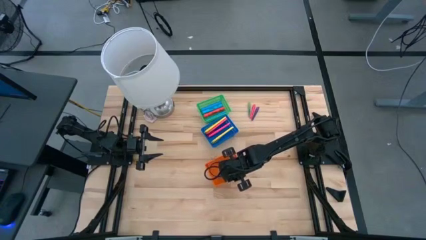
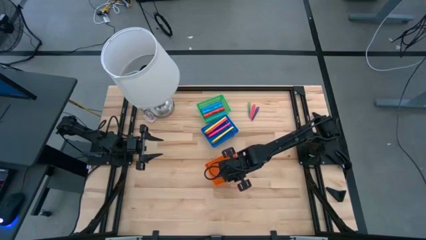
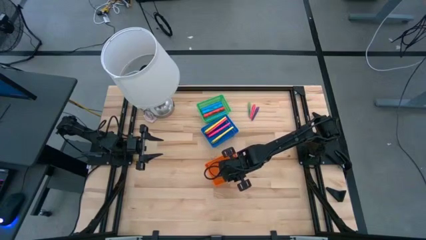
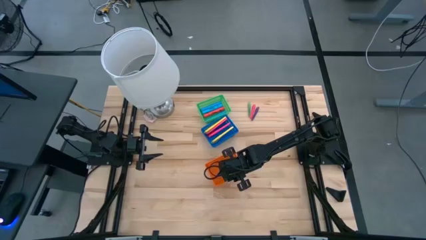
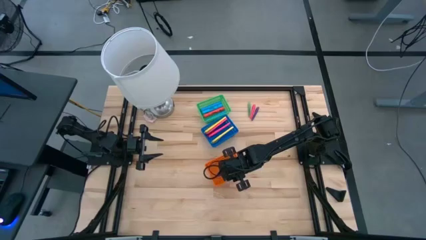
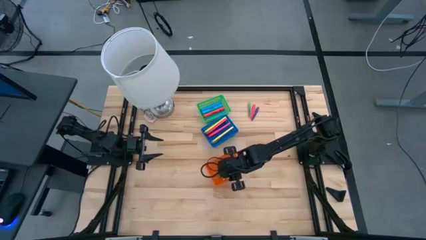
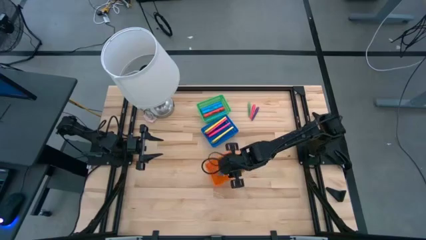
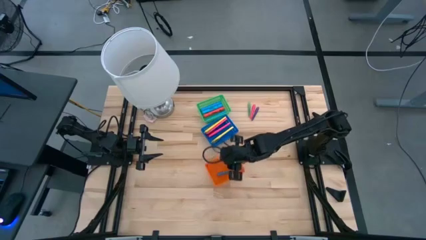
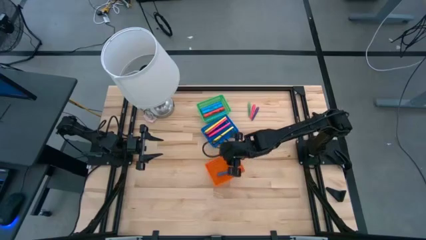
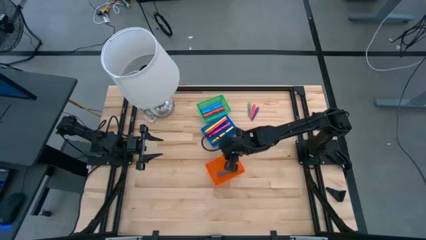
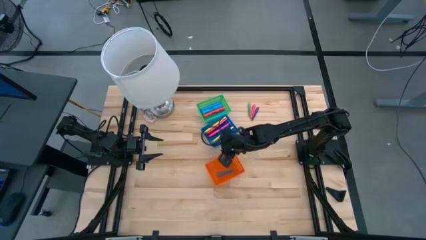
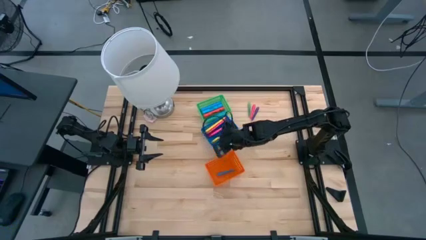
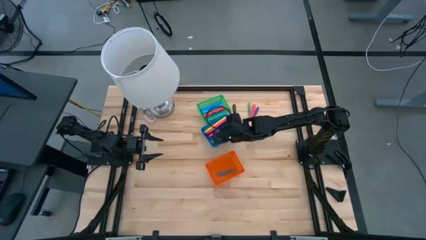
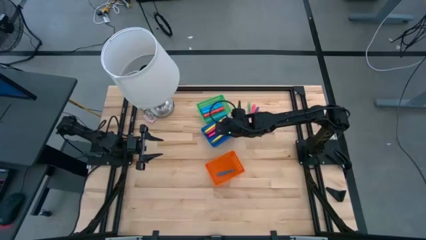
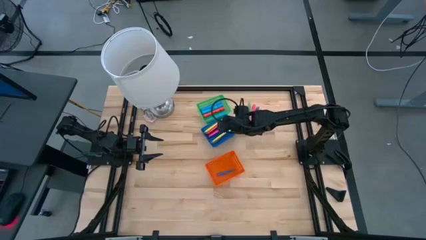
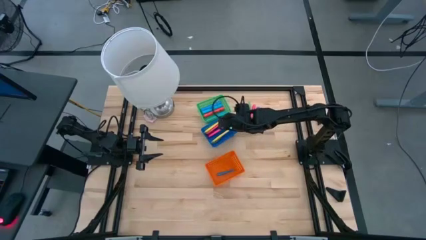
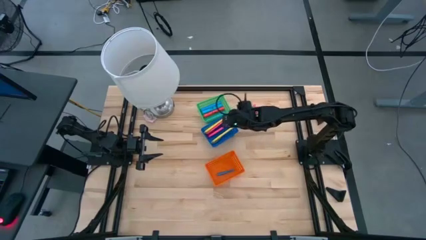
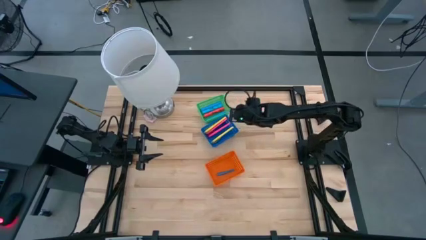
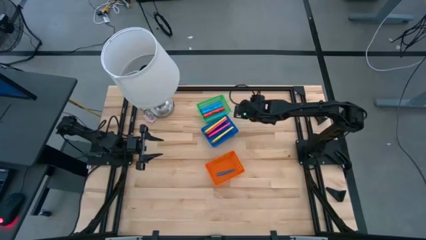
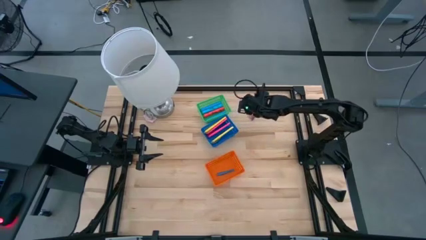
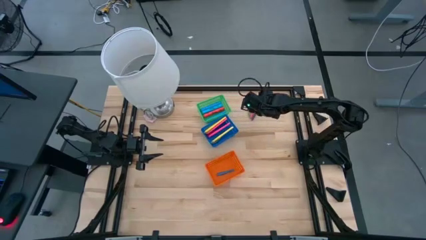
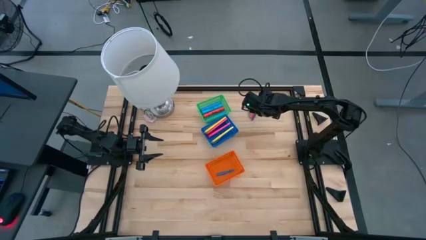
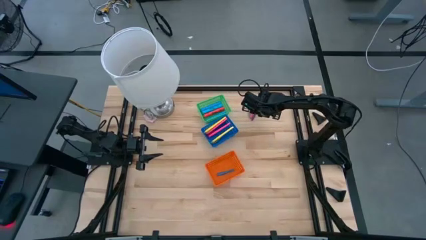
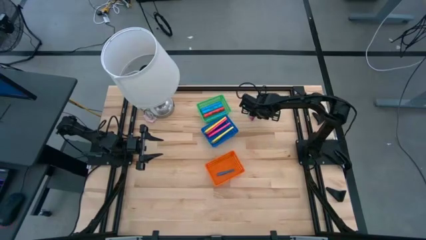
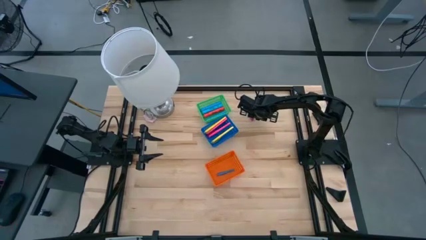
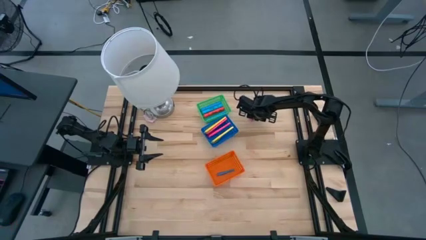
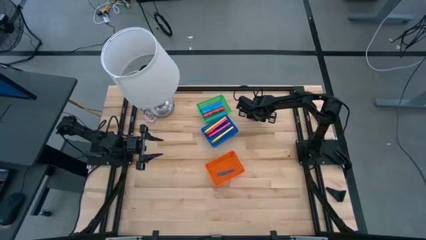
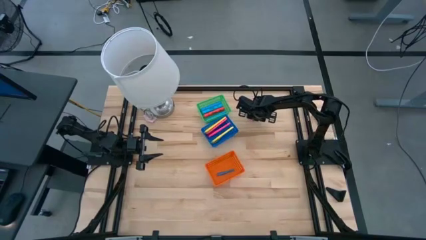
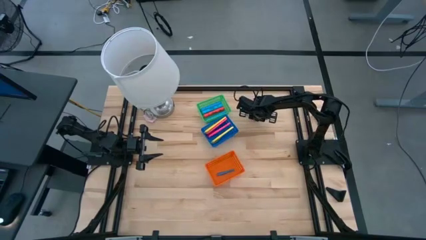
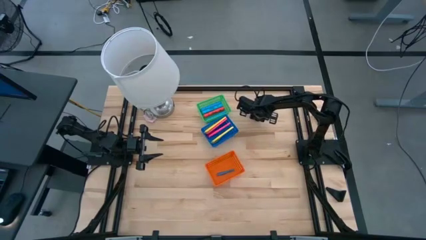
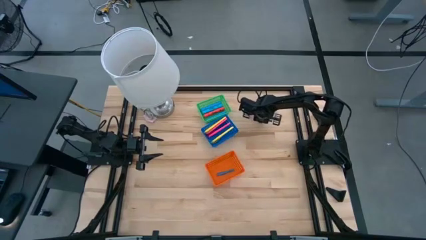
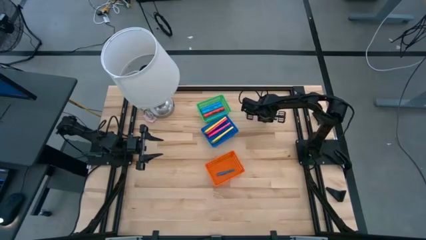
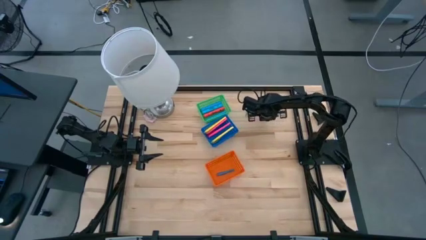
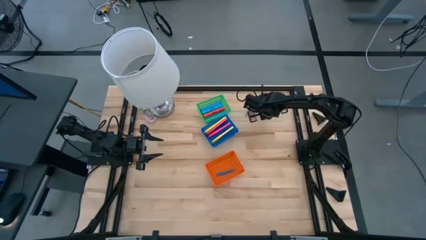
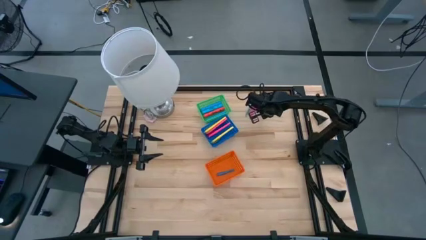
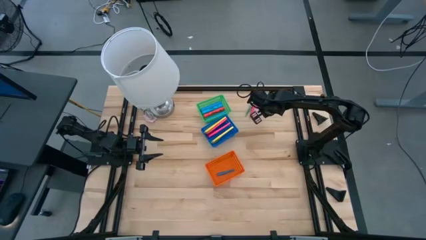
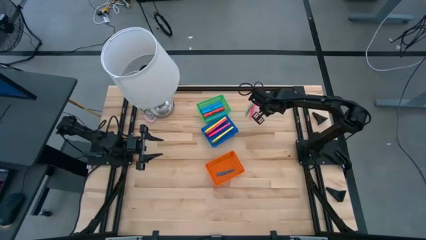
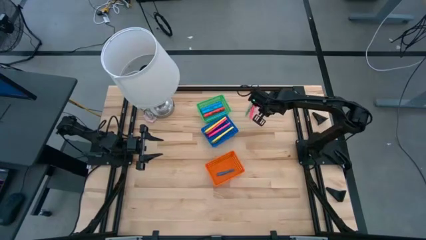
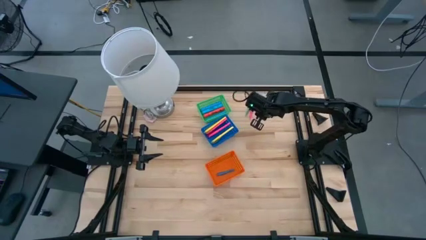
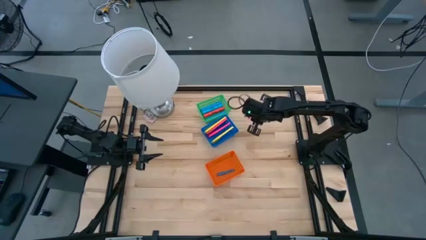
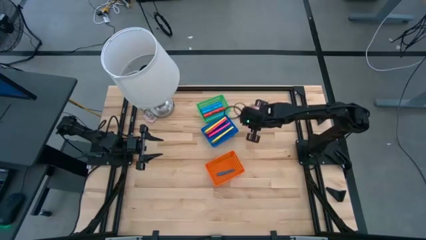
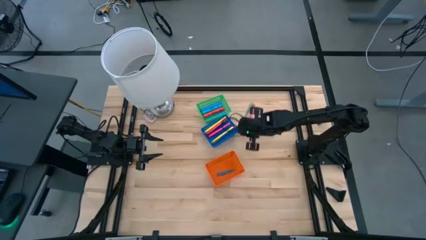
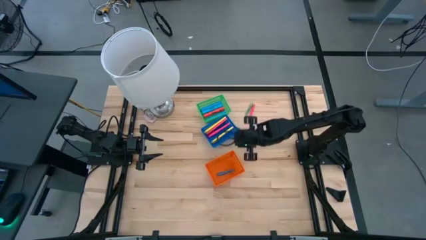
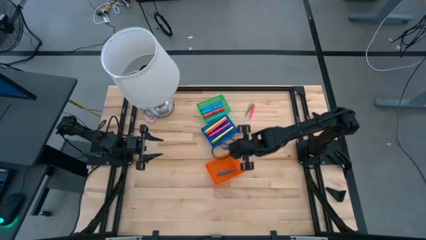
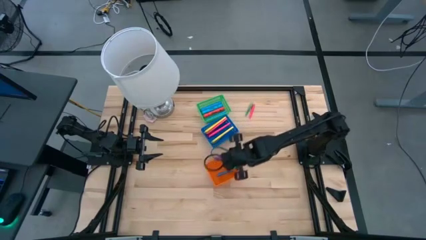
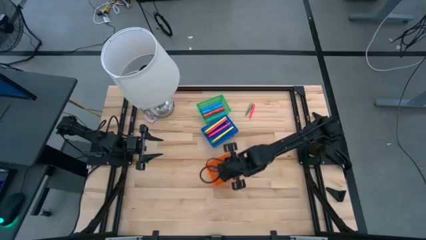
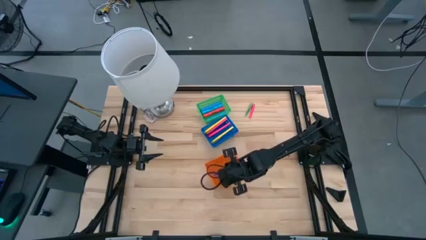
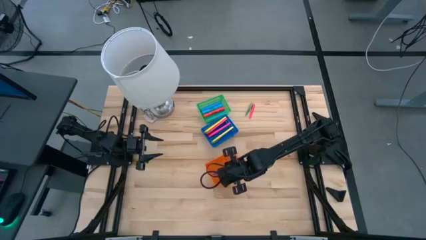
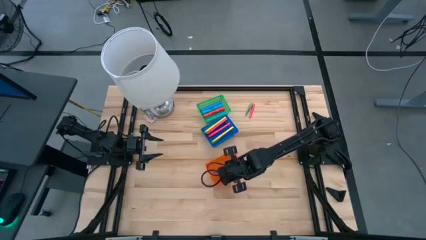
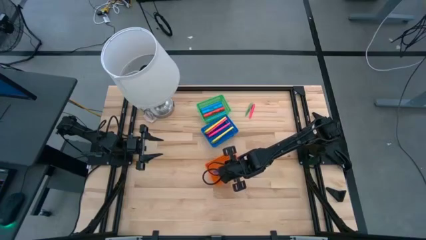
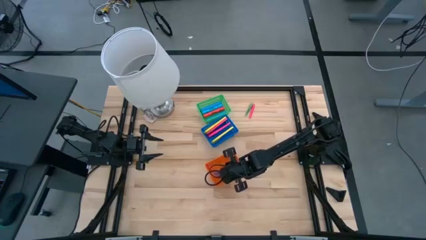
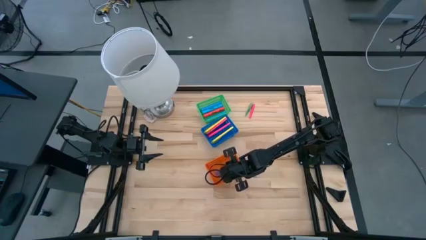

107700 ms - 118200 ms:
Task: Pick & Place Markers
Put the purple marker pen into the orange bin

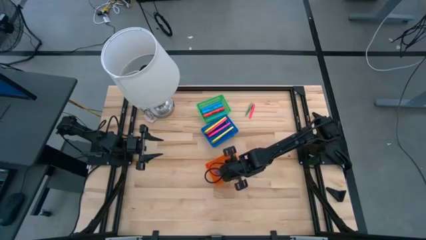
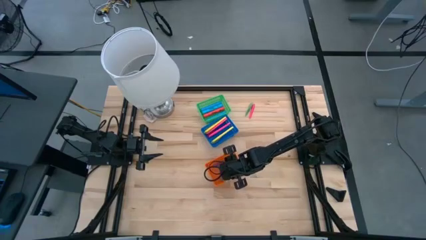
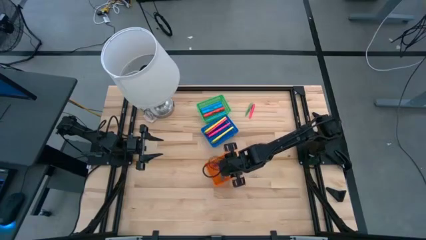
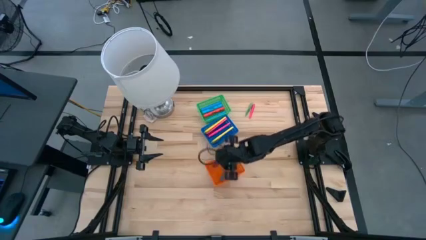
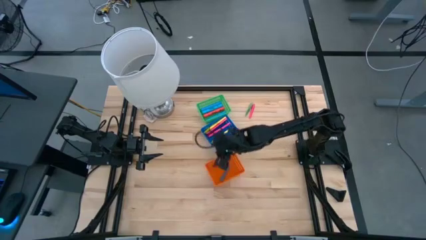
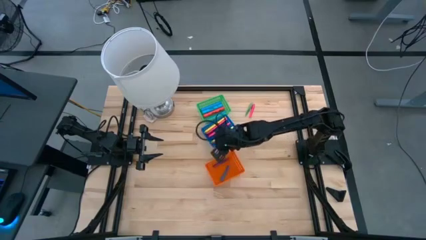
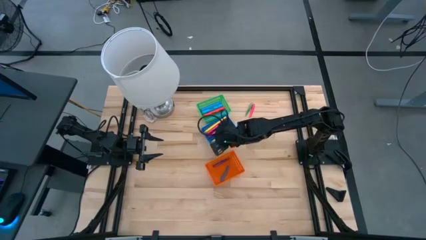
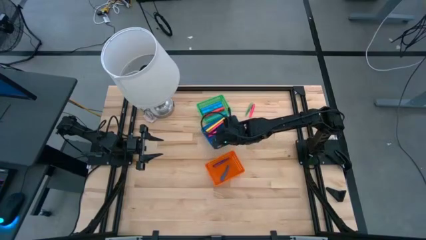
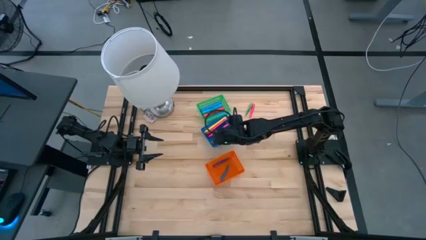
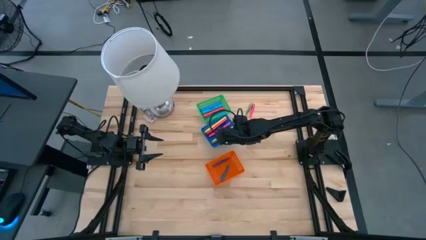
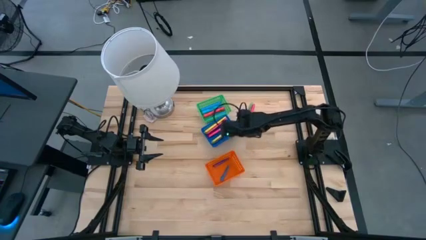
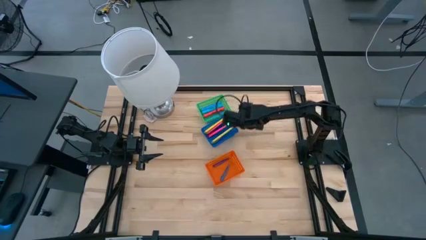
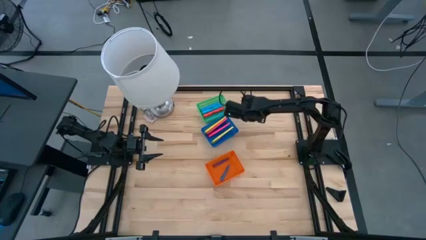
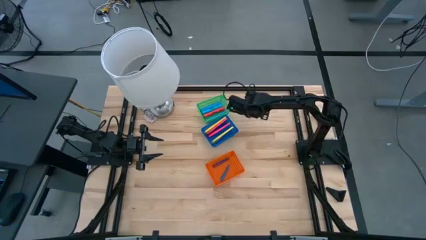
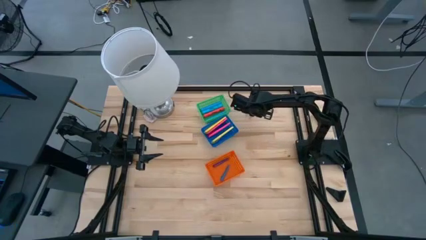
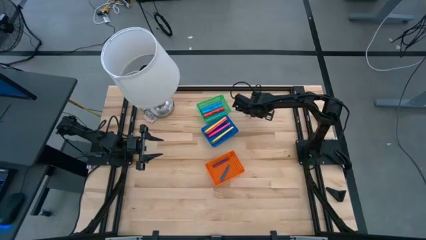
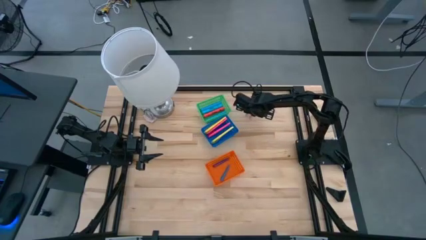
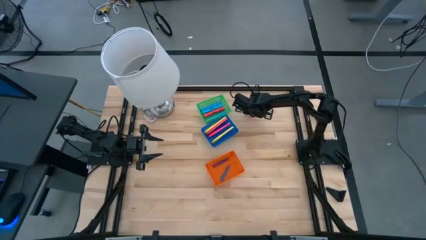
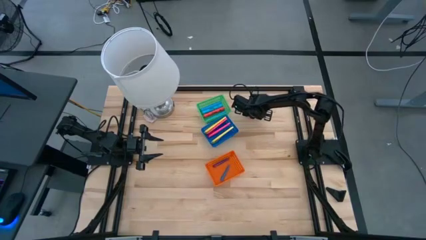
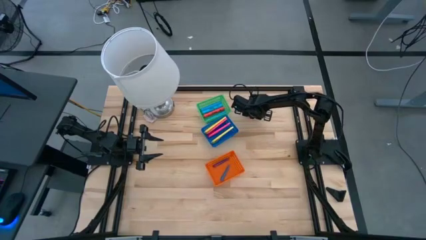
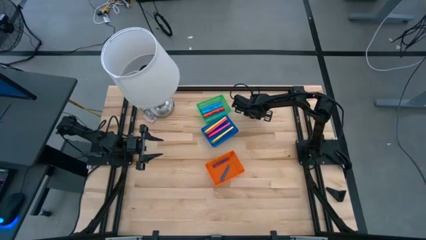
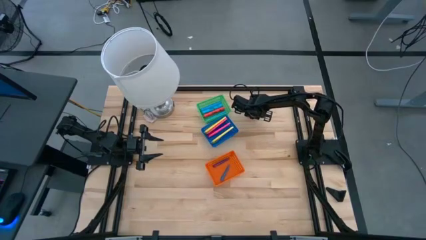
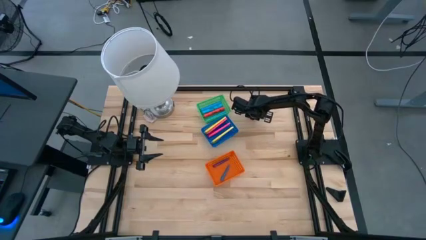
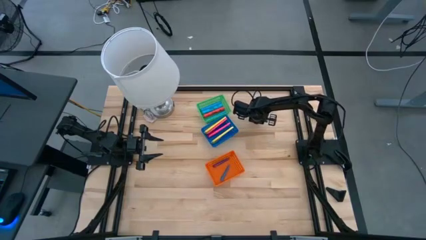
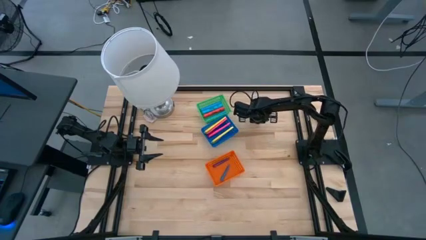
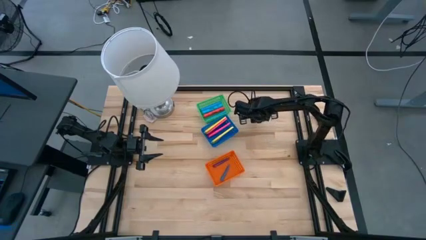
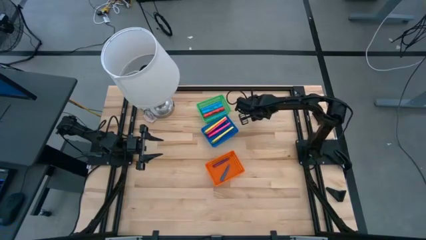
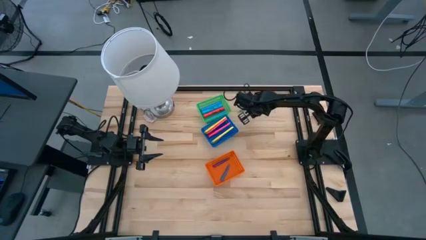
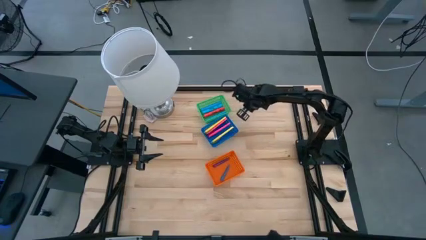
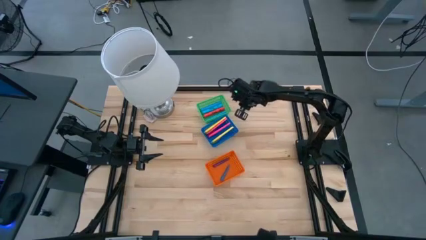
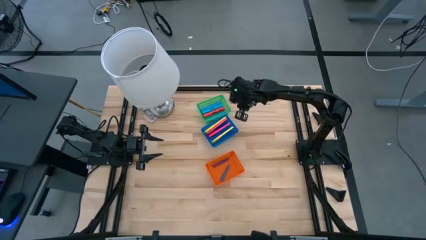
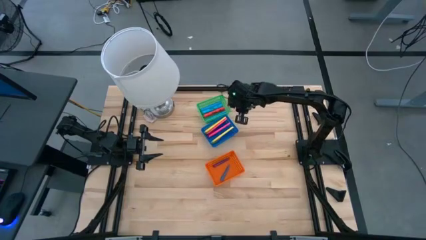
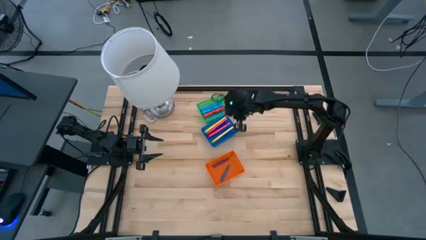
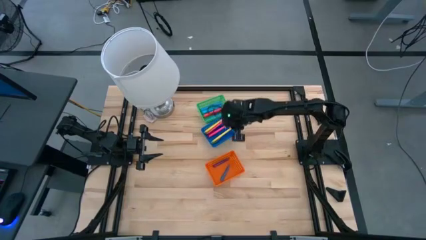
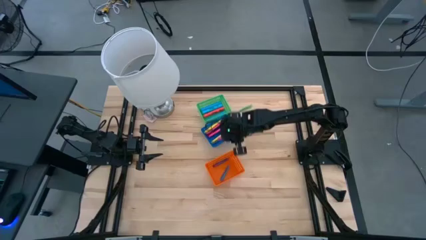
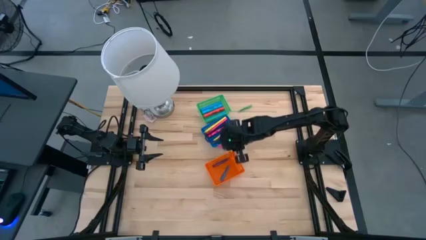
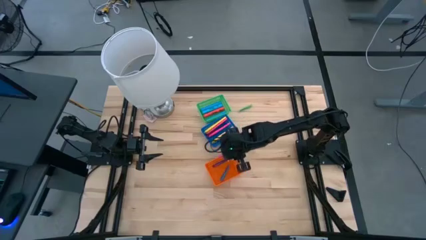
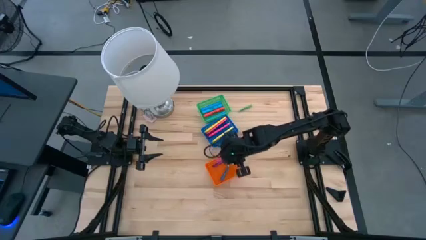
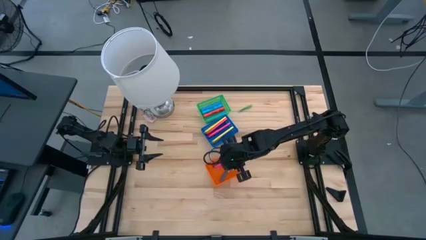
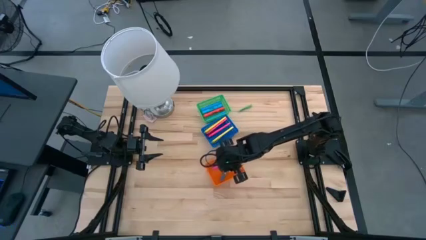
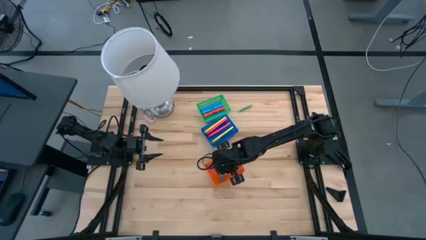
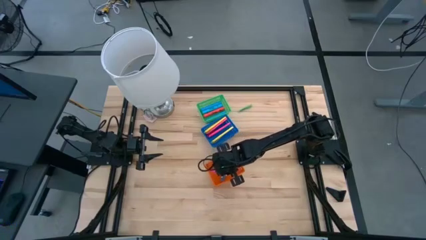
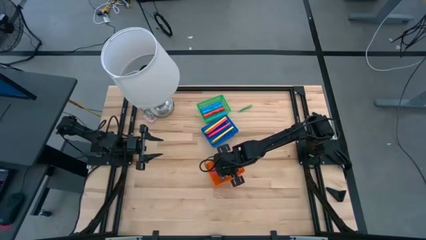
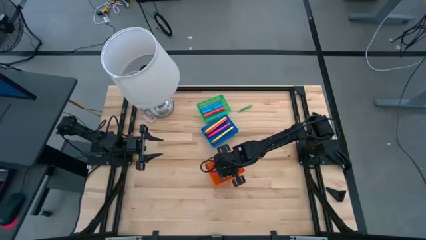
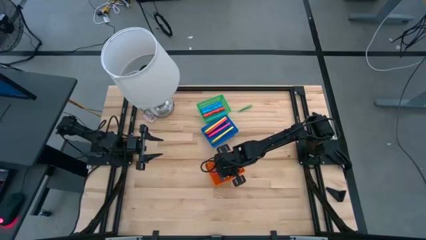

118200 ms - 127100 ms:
Put the pink marker pen into the orange bin
